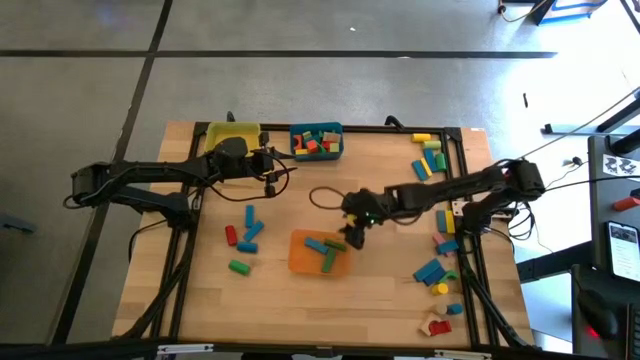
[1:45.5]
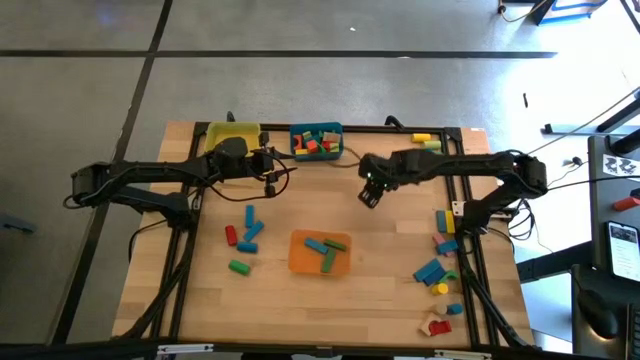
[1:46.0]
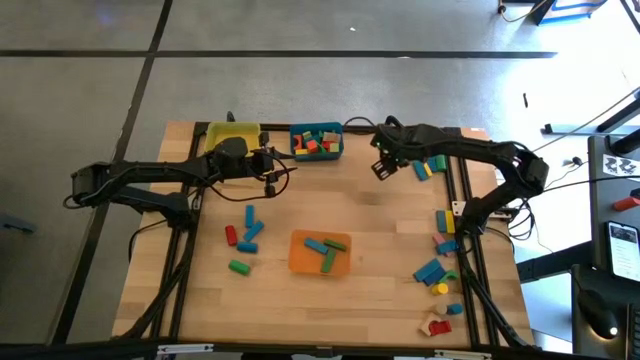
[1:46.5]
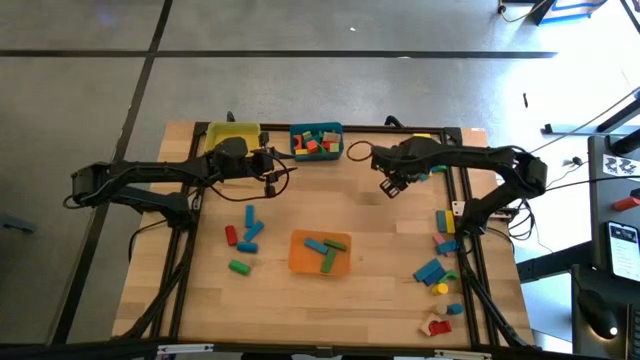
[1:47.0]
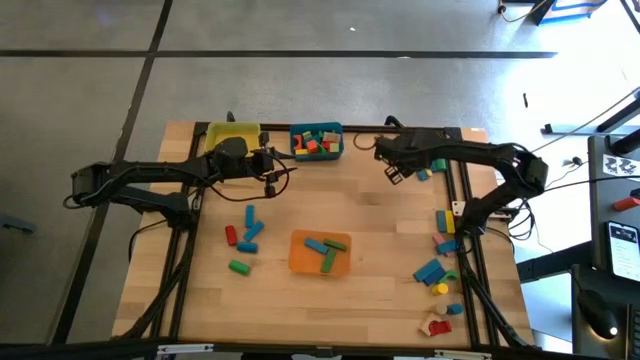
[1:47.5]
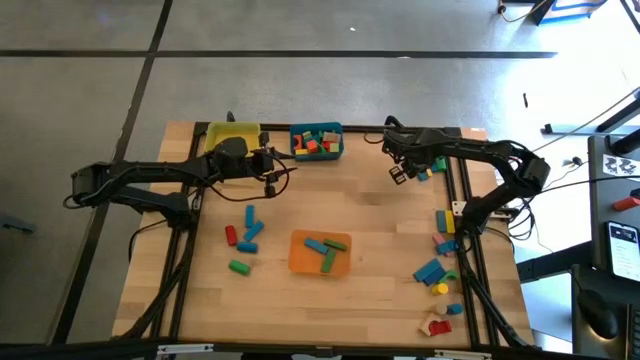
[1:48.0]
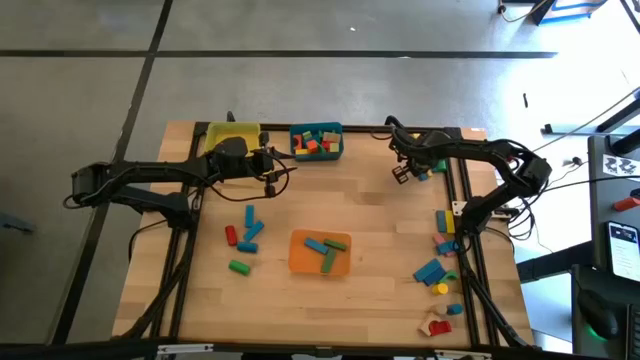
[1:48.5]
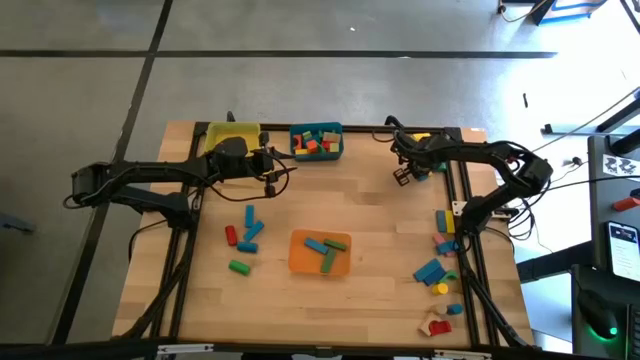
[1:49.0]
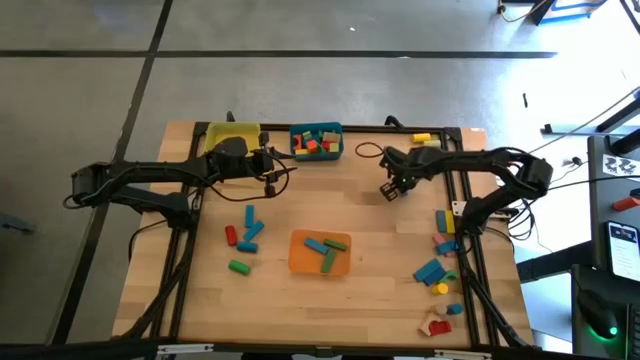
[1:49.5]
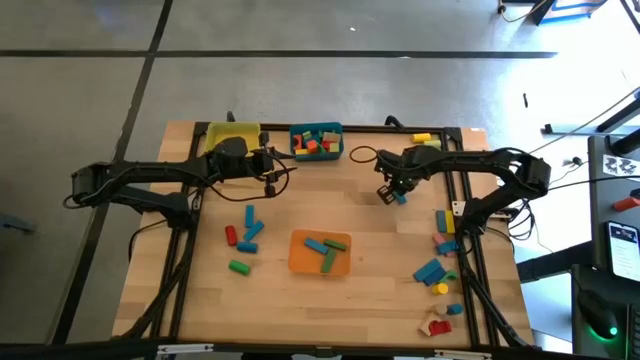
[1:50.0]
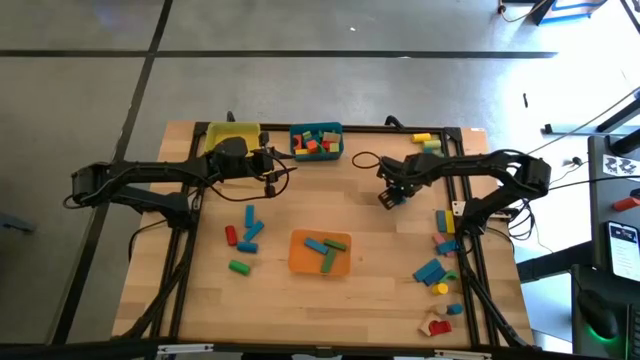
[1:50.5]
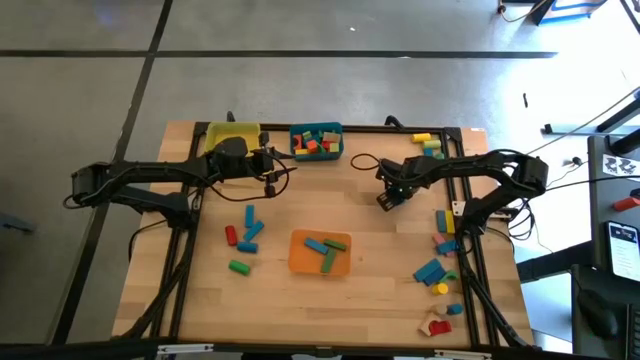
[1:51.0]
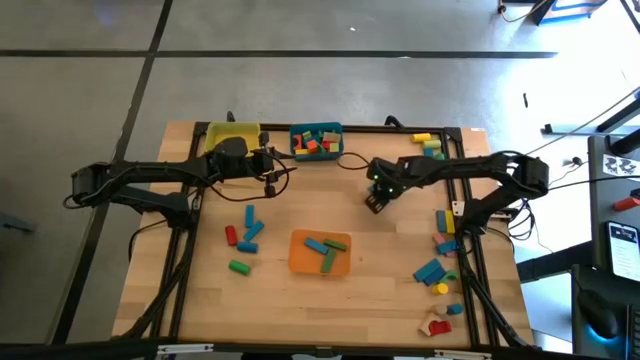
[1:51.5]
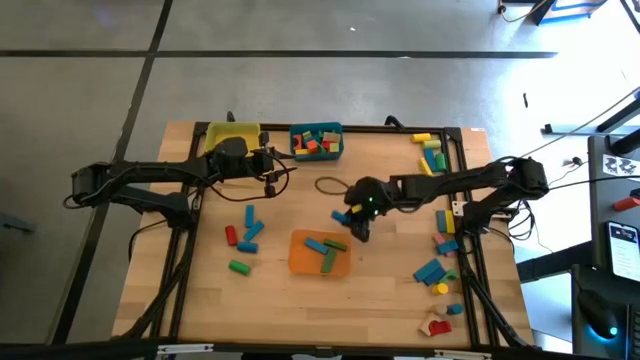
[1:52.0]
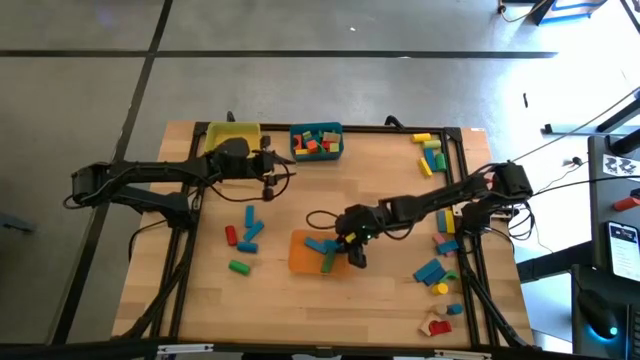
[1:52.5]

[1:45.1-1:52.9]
Task: Sort blocks by size
Put the blue rectangular block into the orange bin

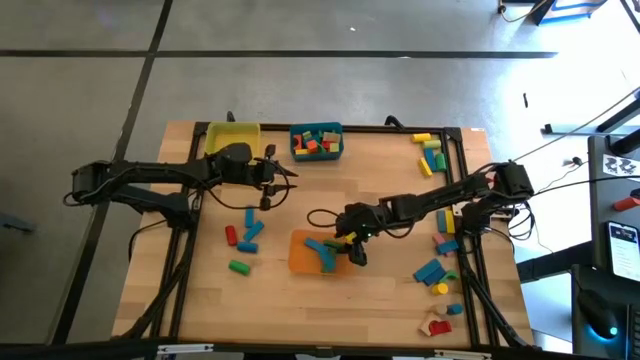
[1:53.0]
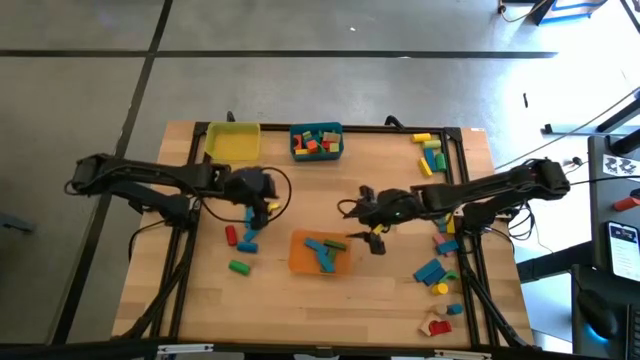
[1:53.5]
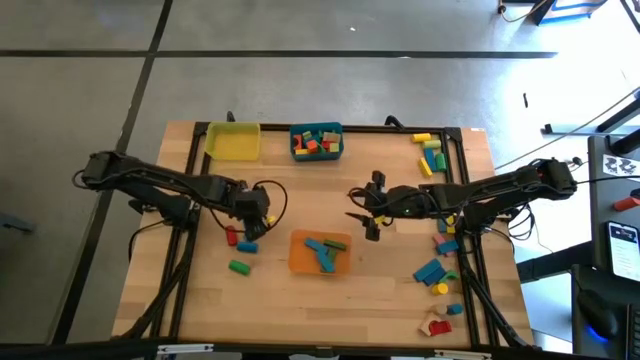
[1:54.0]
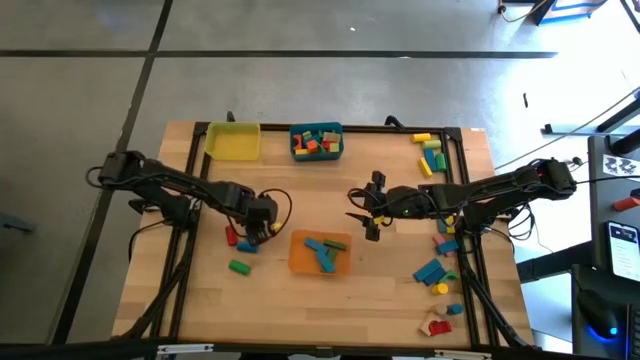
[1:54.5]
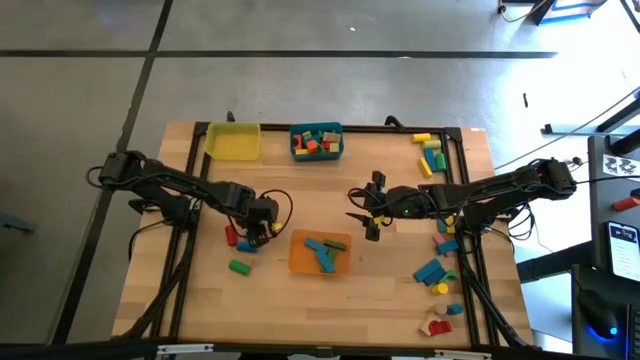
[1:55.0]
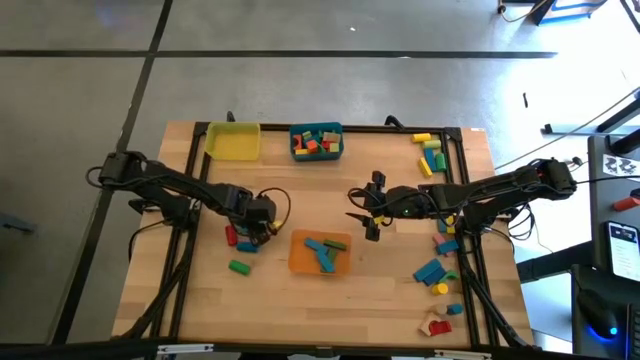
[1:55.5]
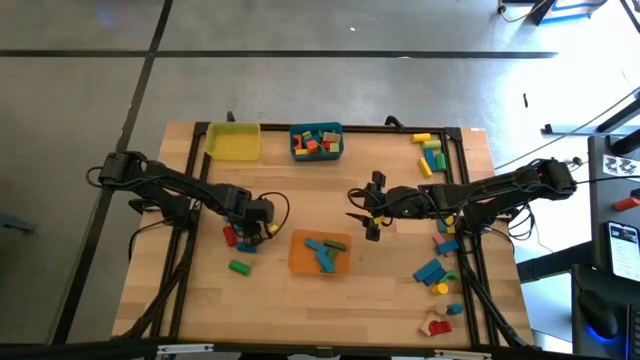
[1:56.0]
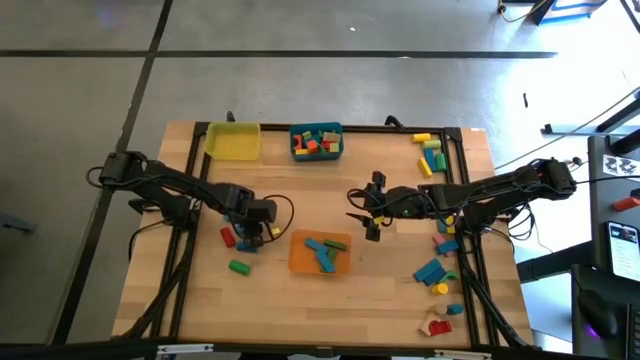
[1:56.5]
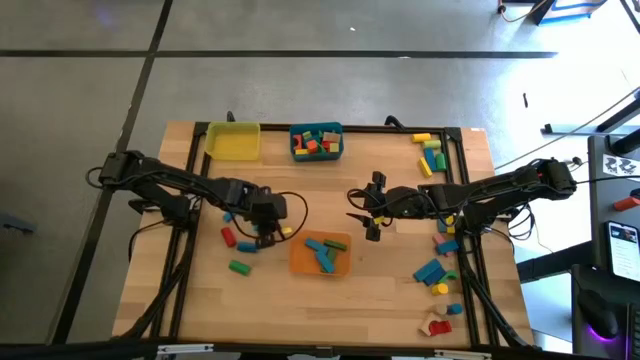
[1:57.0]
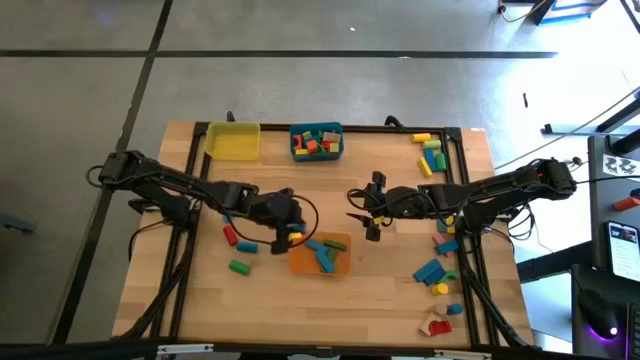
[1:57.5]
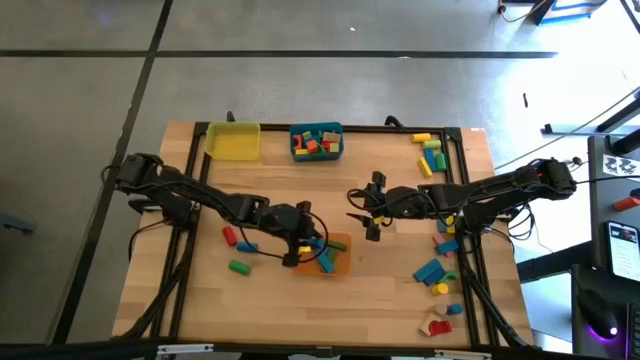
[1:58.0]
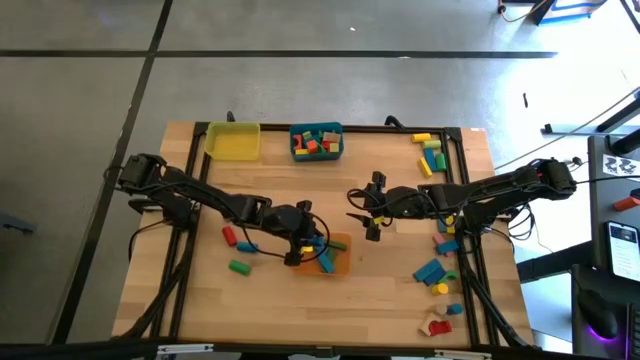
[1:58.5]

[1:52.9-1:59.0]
Put the blue rectangular block into the orange bin

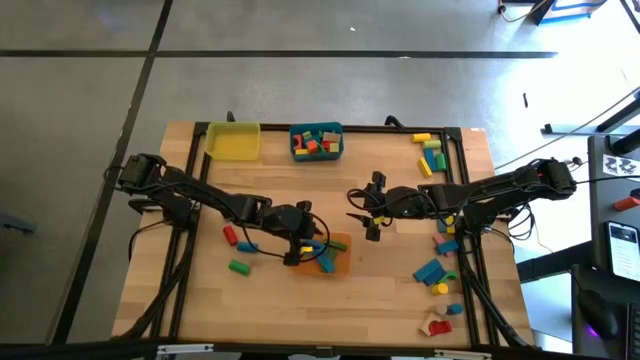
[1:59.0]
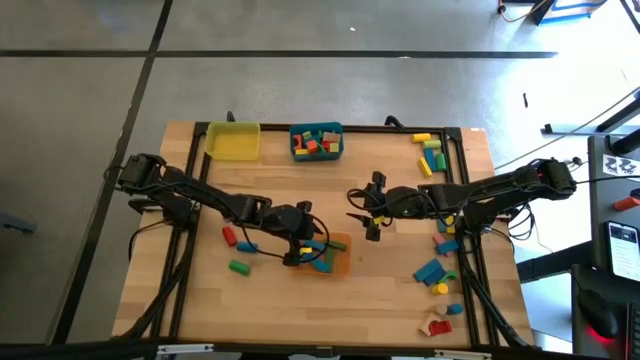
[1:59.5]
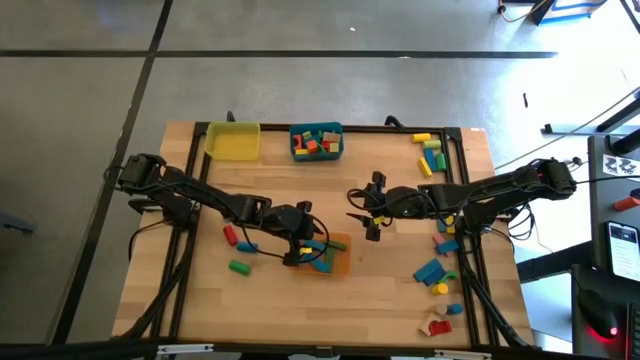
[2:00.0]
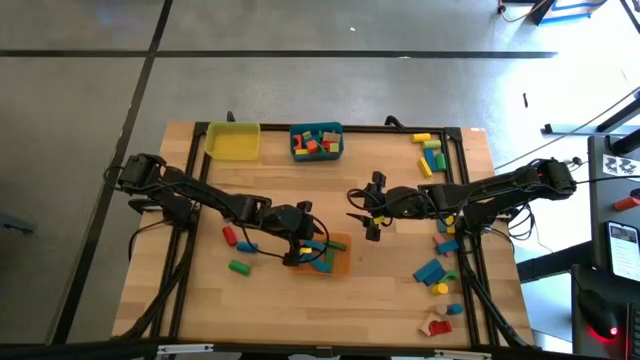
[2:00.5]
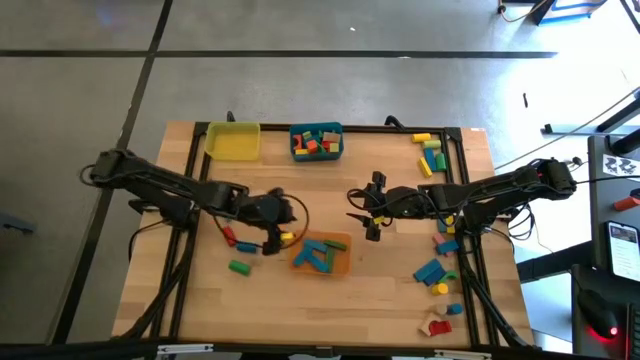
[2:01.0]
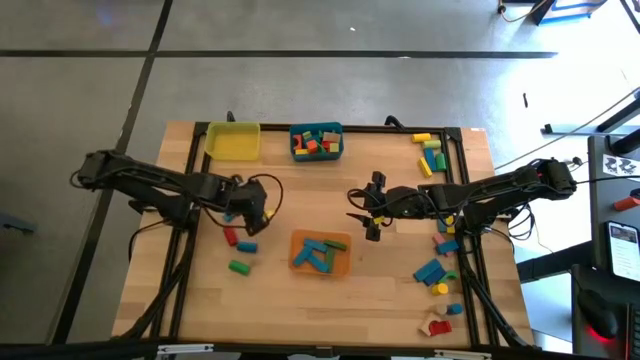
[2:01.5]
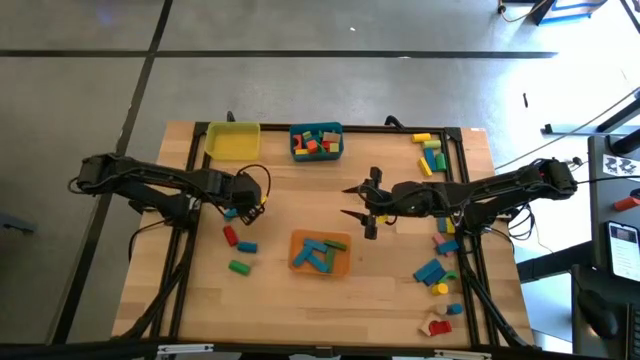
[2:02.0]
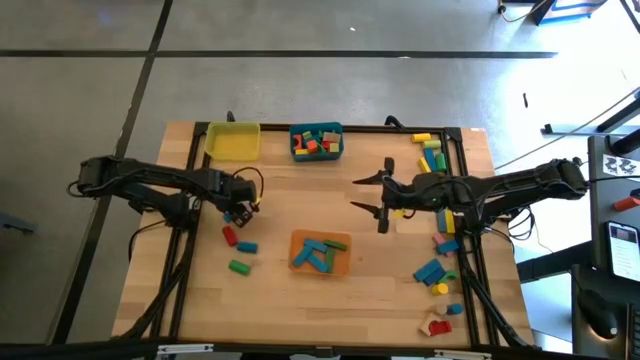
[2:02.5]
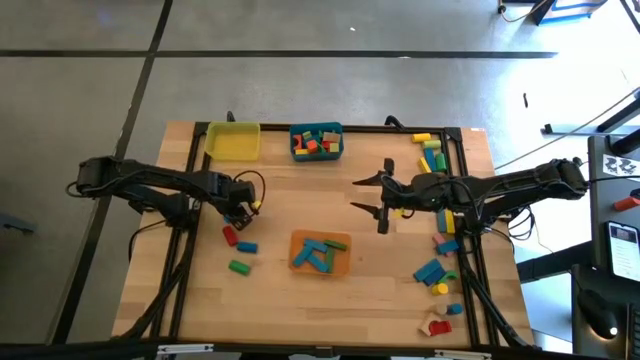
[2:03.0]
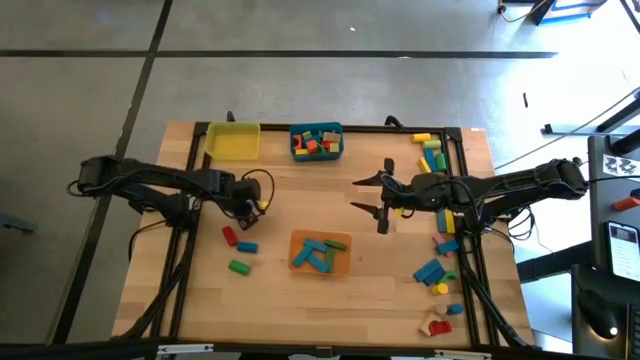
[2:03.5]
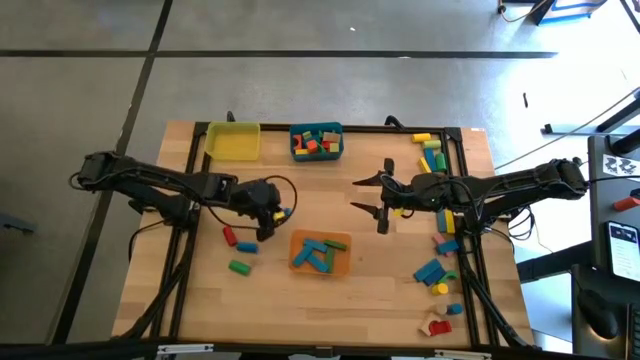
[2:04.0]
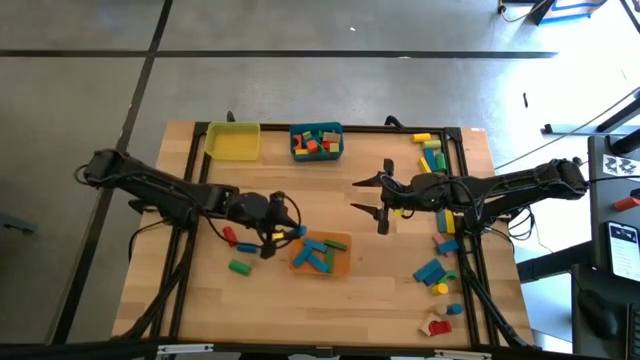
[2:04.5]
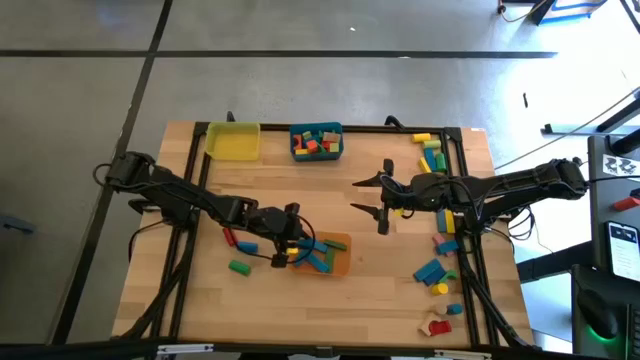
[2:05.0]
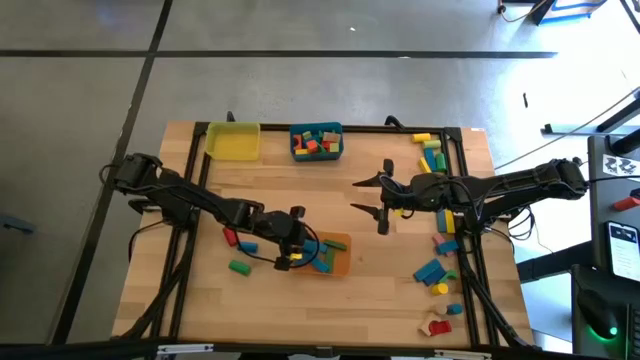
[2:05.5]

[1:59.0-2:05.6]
Put the blue rectangular block into the orange bin

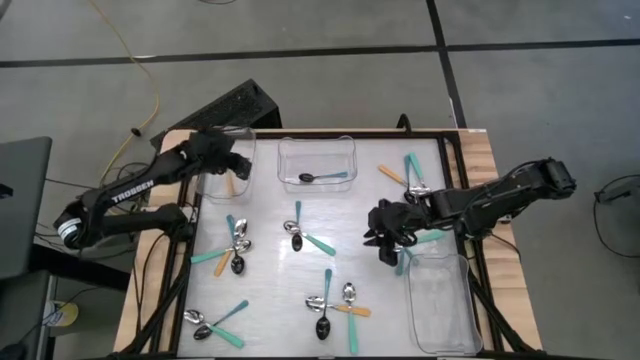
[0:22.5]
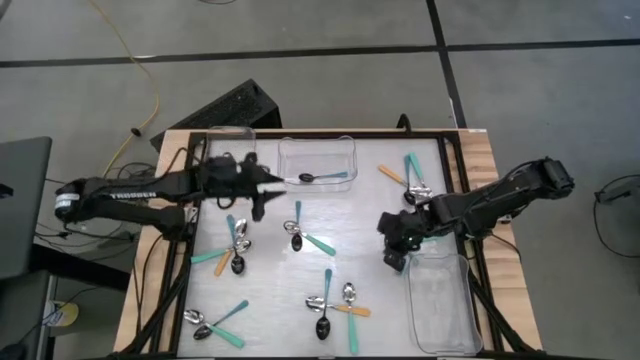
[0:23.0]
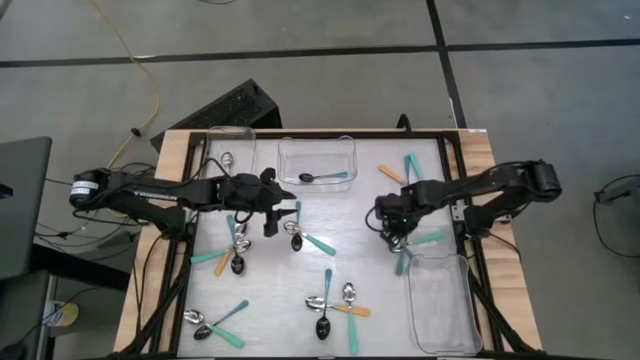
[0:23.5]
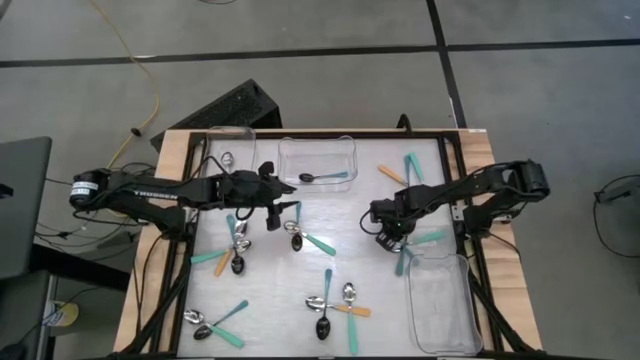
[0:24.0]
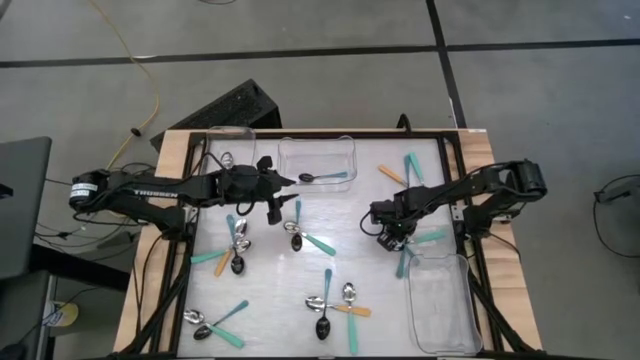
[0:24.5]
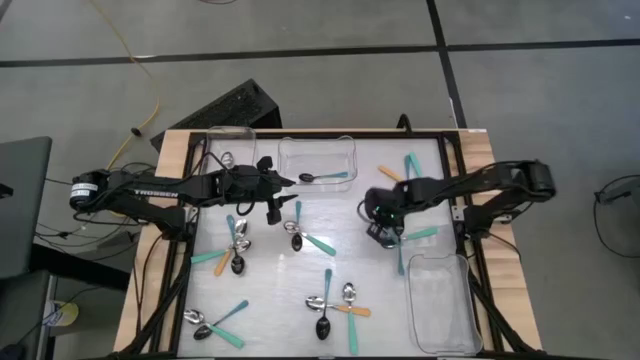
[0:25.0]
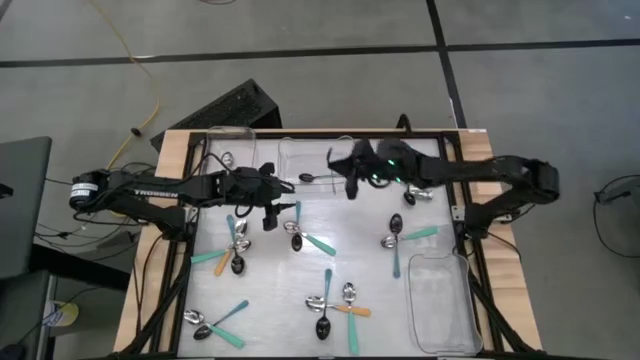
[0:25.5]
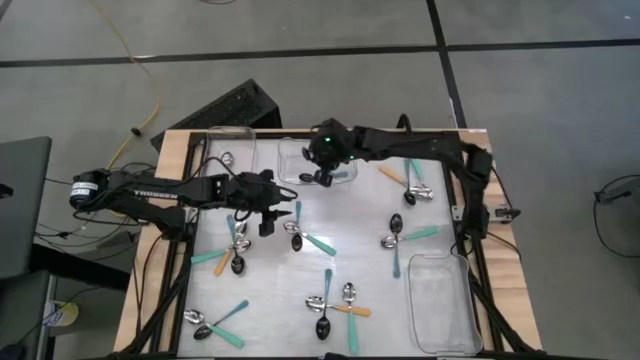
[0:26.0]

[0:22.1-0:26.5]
Task: Sort silverware by color (type)
Put the blue spoon into the top middle transparent bin
